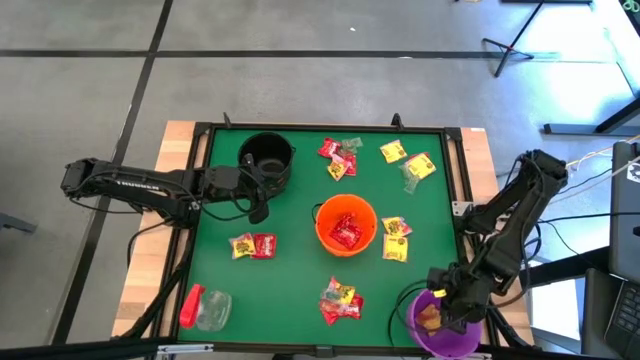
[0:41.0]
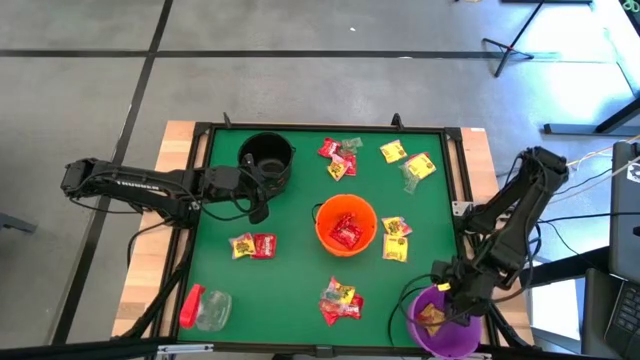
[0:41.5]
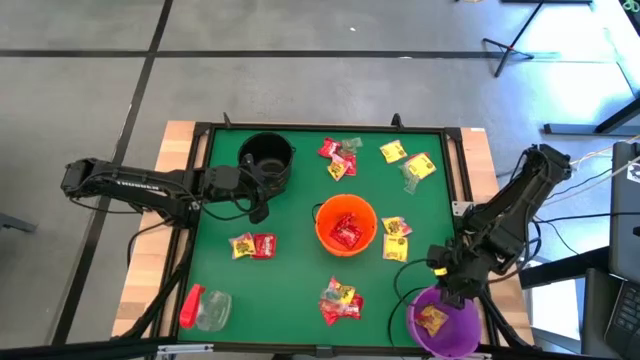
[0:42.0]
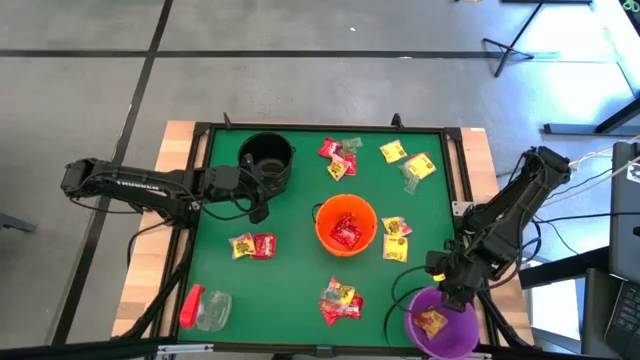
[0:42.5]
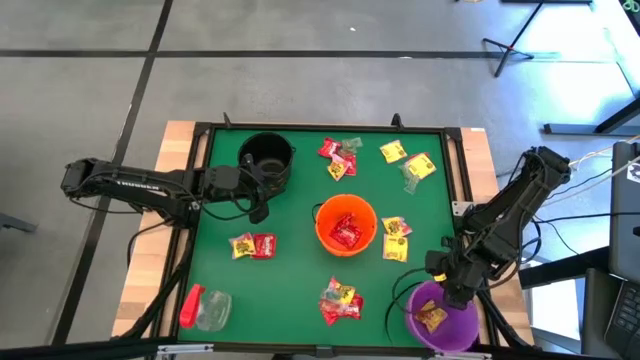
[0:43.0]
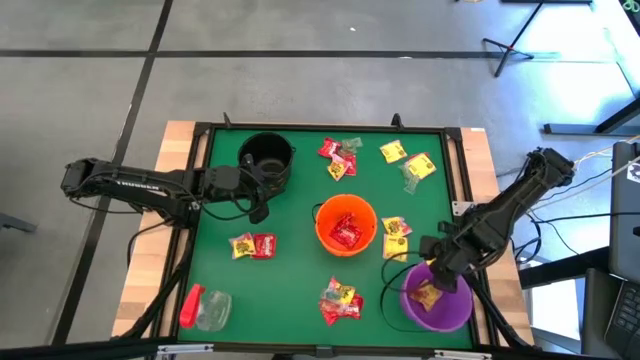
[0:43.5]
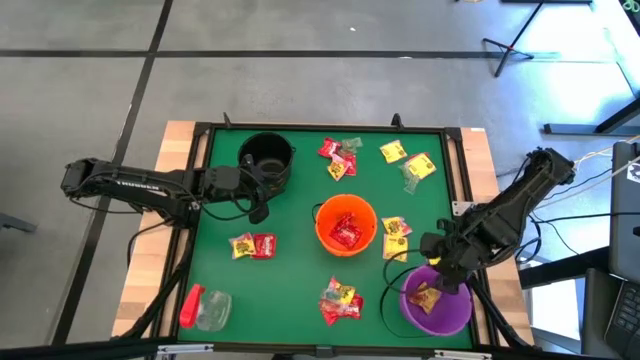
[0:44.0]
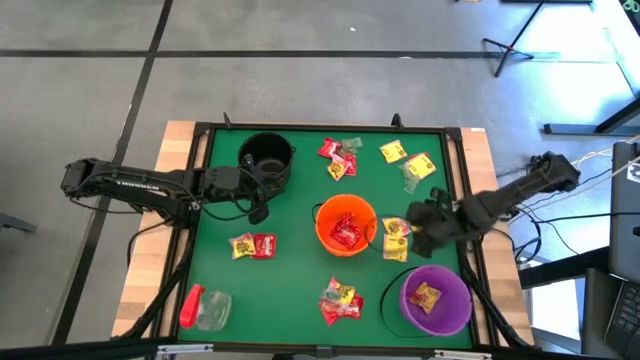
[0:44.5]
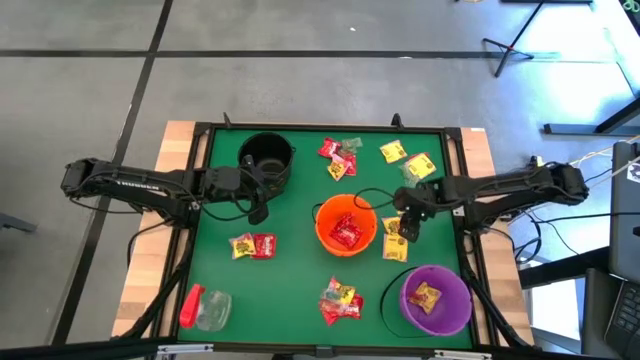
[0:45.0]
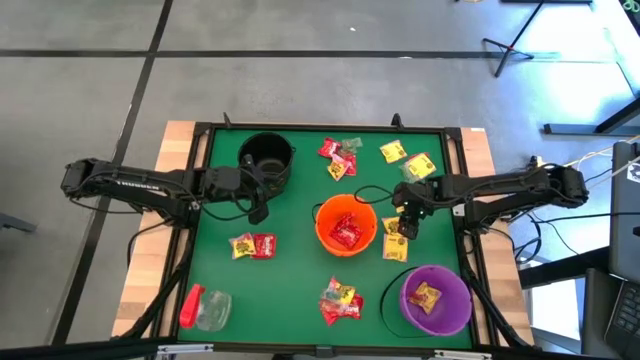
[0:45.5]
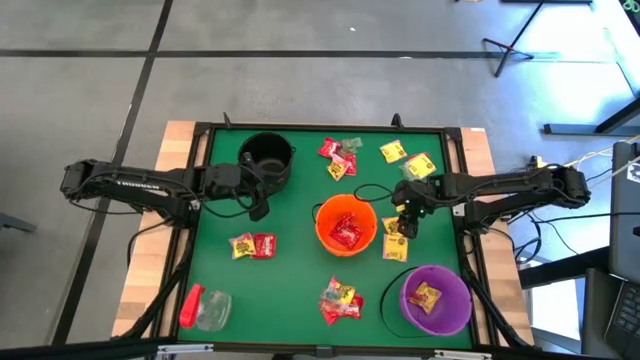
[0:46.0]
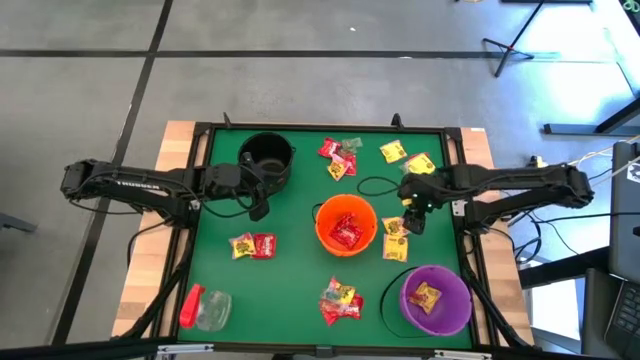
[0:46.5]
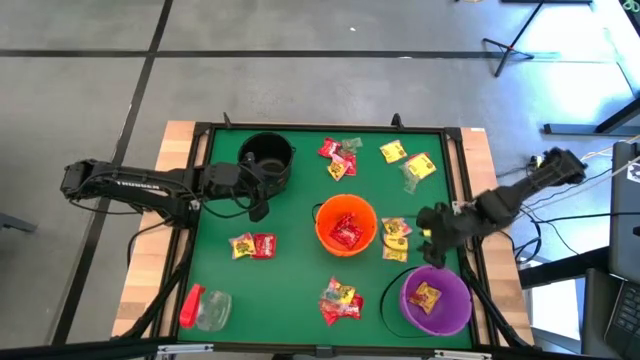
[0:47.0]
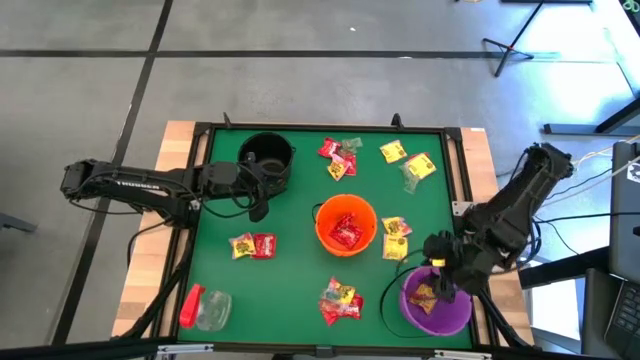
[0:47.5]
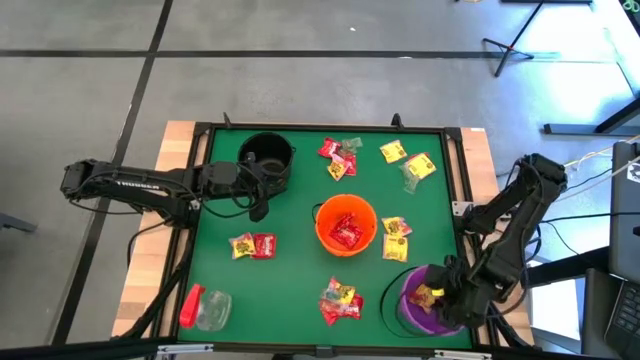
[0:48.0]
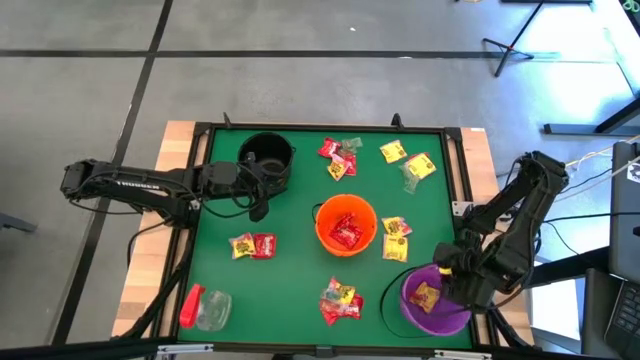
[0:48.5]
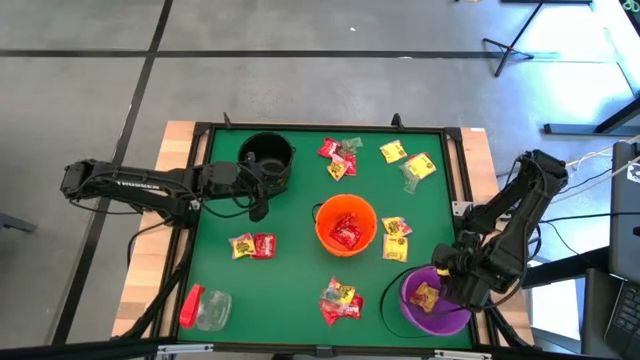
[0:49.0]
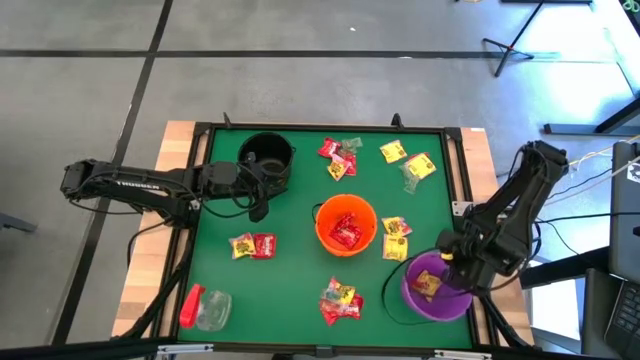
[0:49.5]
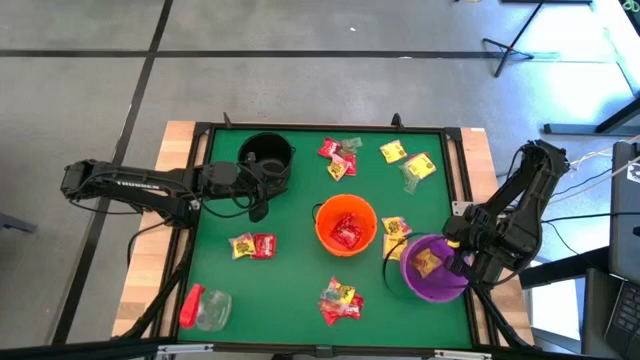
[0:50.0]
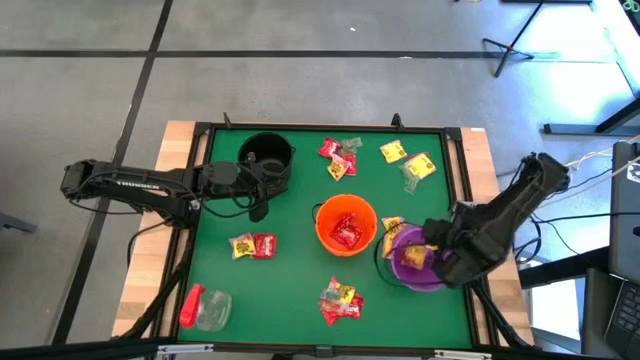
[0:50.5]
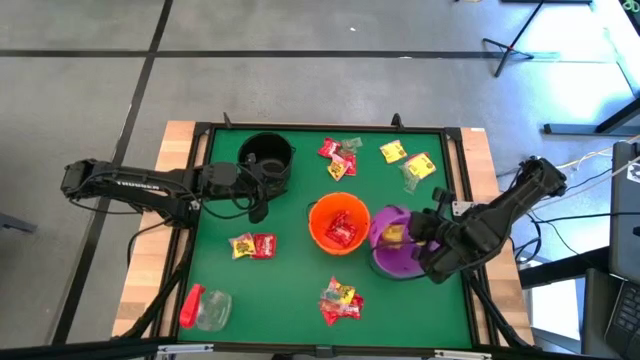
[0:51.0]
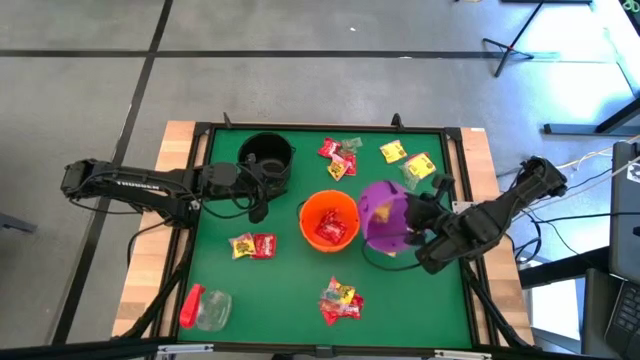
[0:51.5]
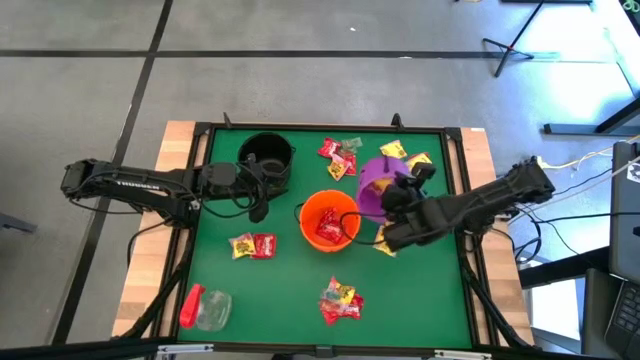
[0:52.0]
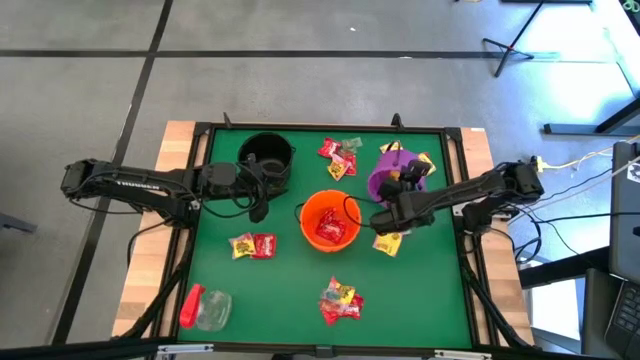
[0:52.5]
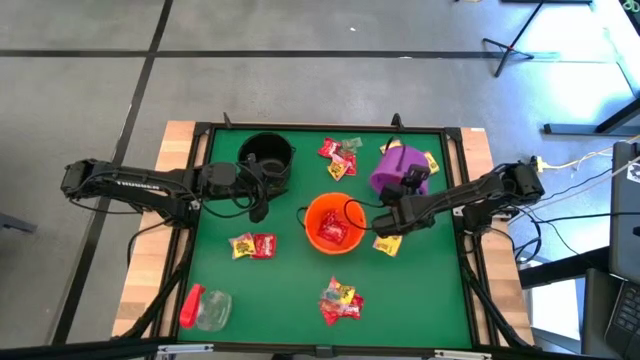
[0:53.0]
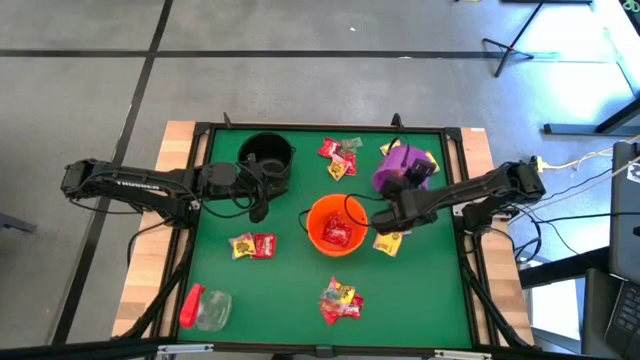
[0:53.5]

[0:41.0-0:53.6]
Task: Sort candy
Move the purple bin on the top right of the table

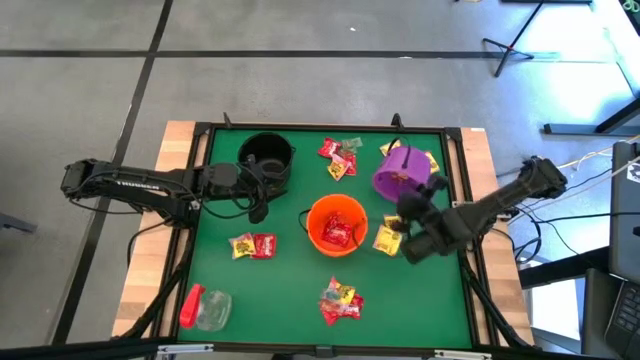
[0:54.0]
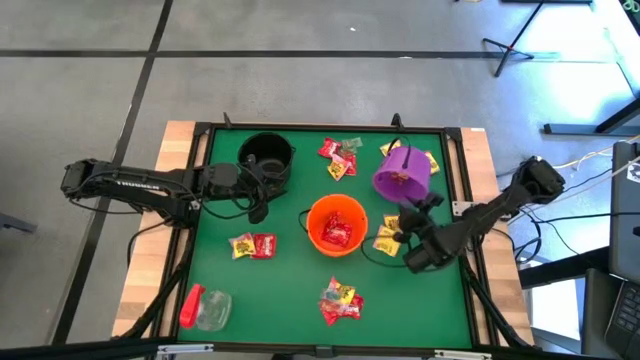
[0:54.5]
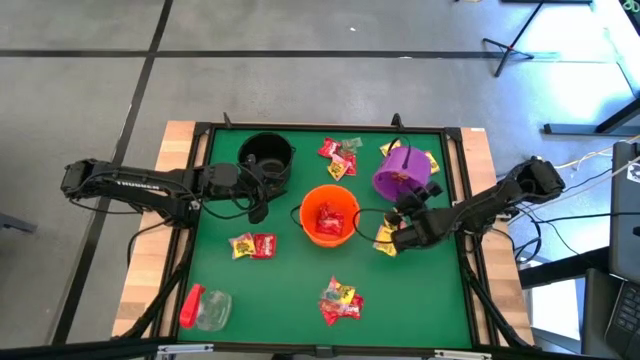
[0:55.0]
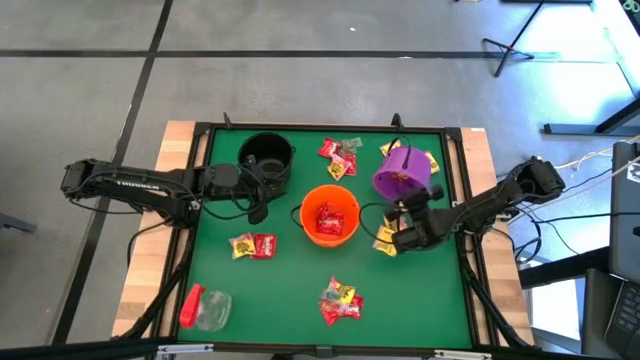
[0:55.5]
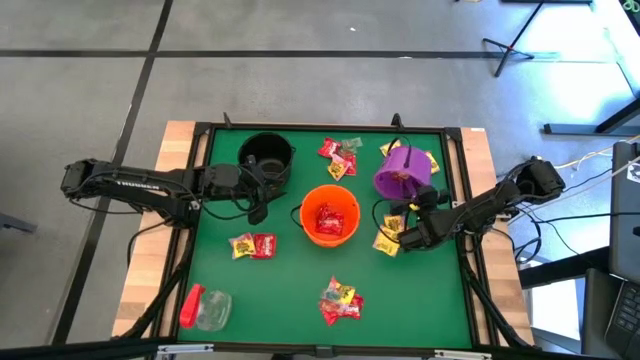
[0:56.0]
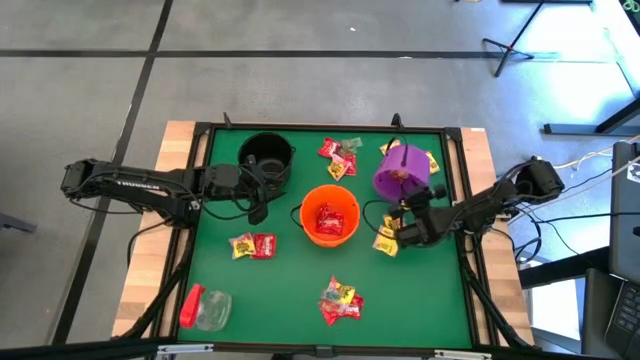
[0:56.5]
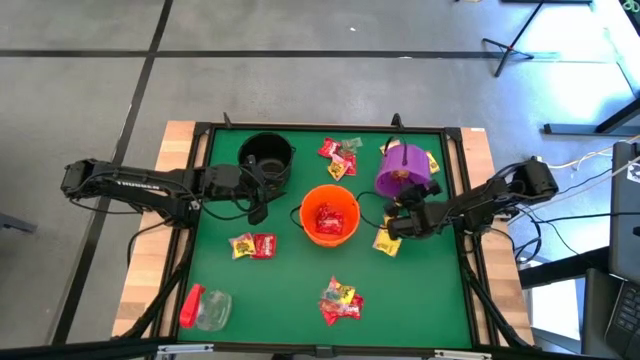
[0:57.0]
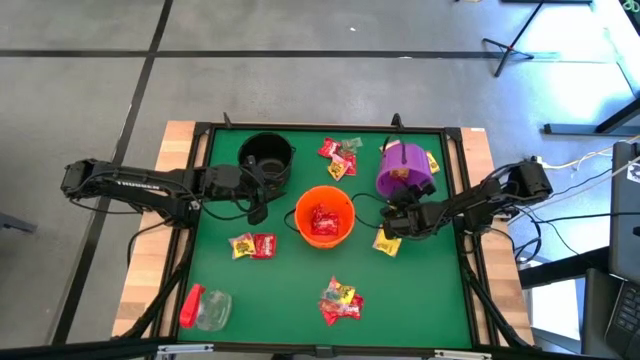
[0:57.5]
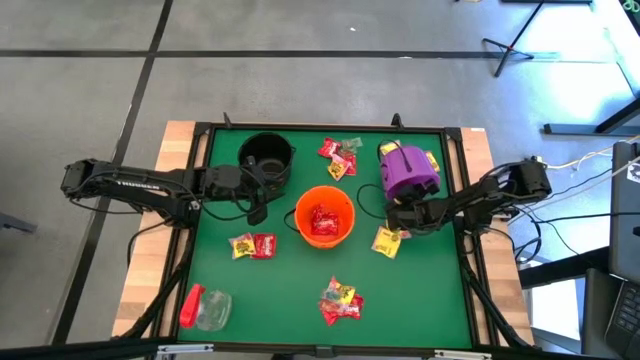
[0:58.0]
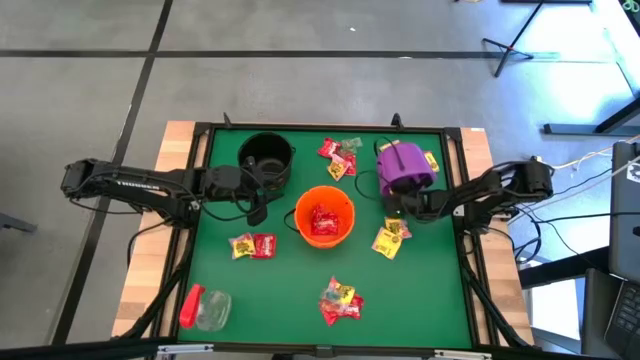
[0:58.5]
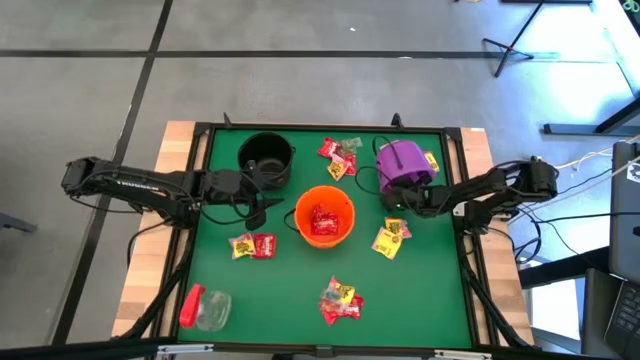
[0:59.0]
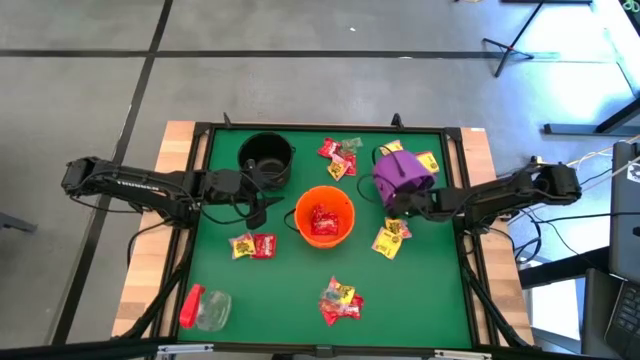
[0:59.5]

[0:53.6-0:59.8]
Remove the orange candy from the purple bin and put it into the orange bin

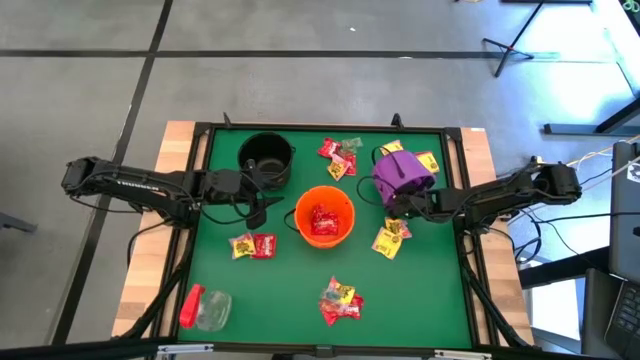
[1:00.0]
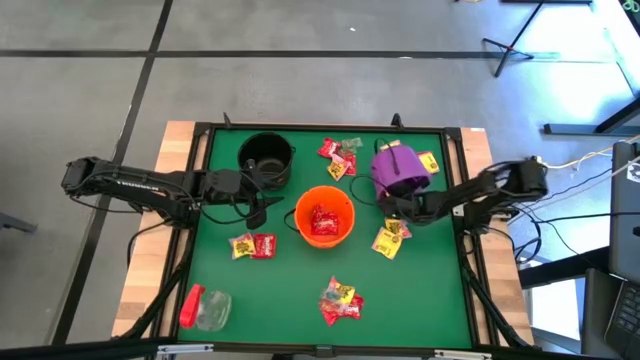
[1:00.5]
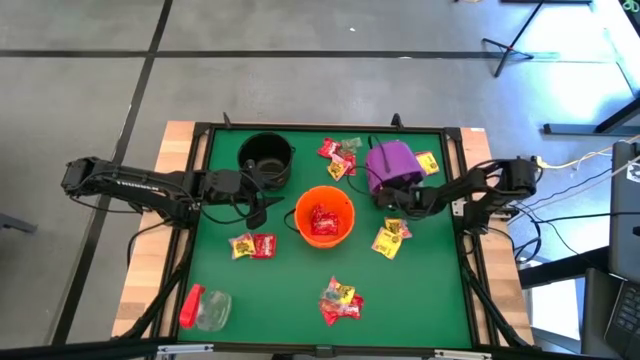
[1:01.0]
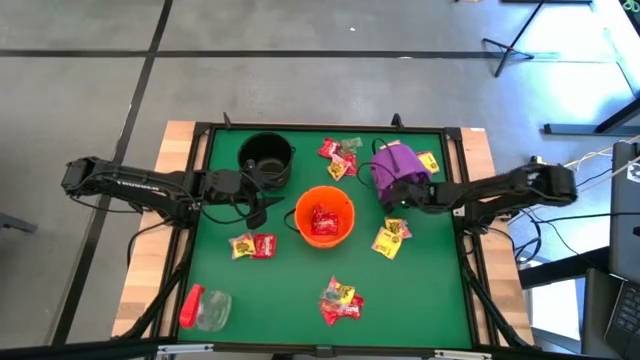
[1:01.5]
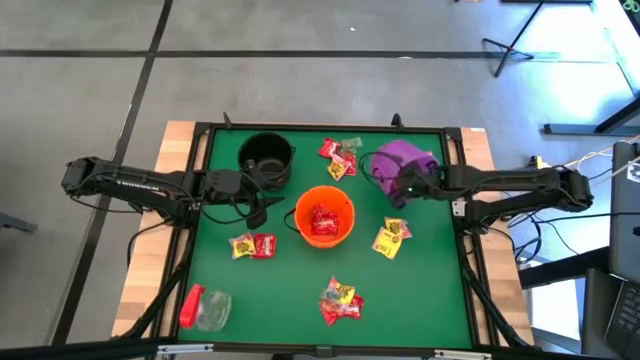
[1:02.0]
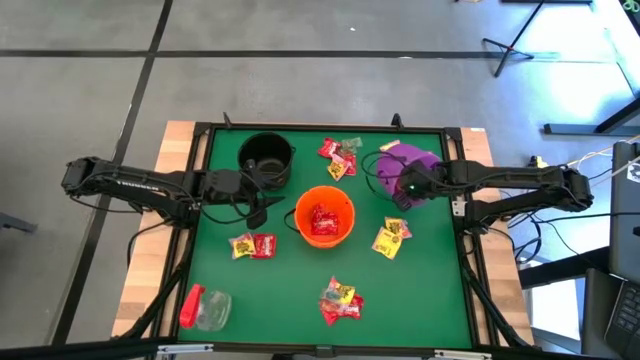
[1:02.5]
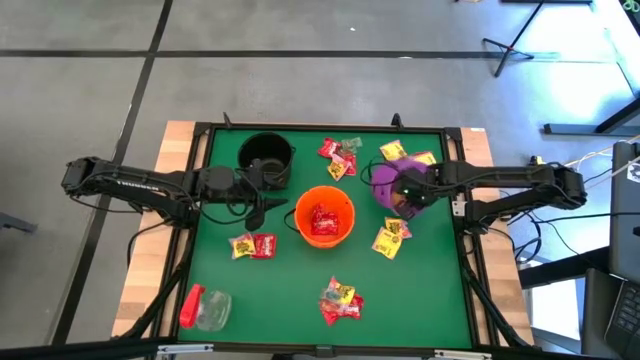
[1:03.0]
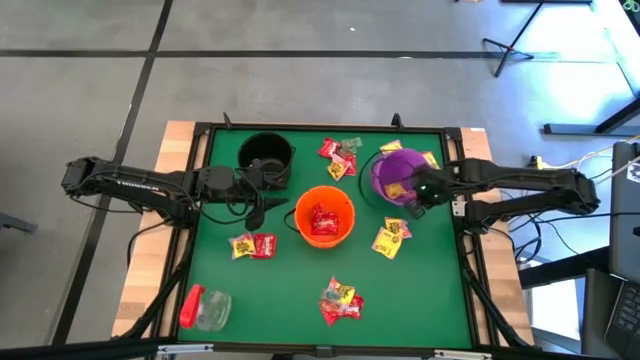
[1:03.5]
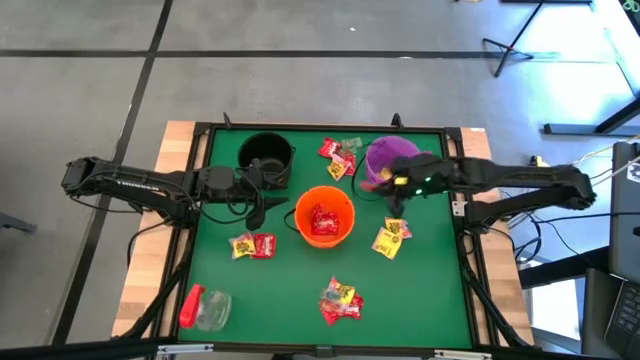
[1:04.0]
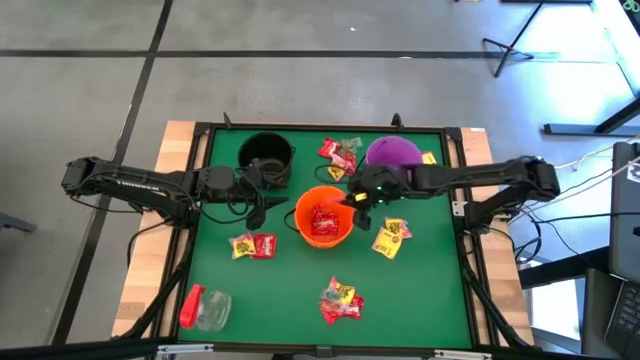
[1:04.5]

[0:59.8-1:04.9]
Remove the orange candy from the purple bin and put it into the orange bin
